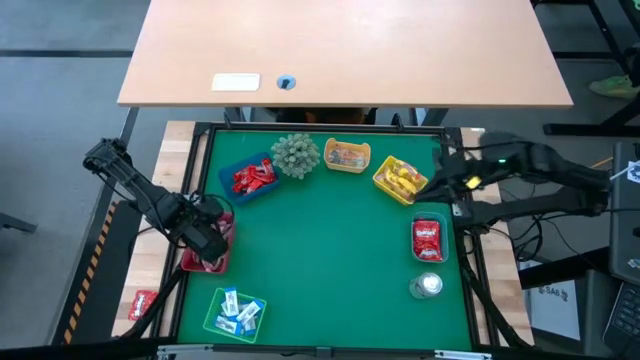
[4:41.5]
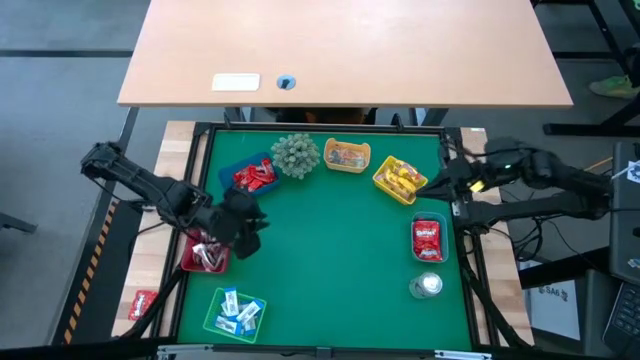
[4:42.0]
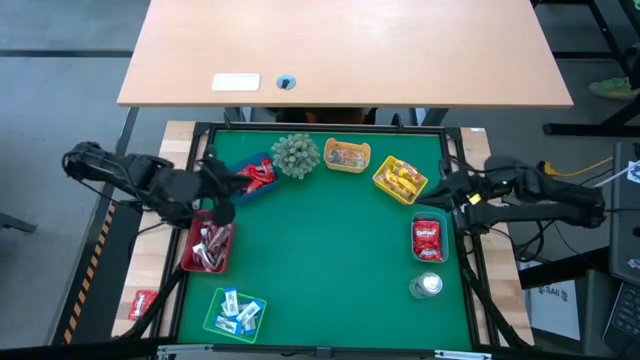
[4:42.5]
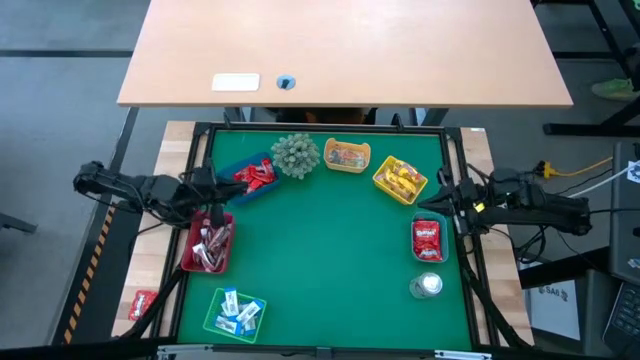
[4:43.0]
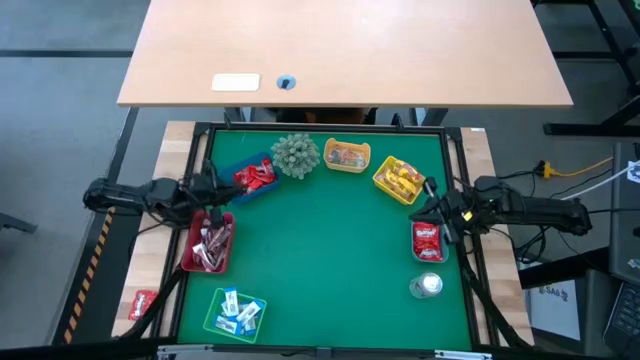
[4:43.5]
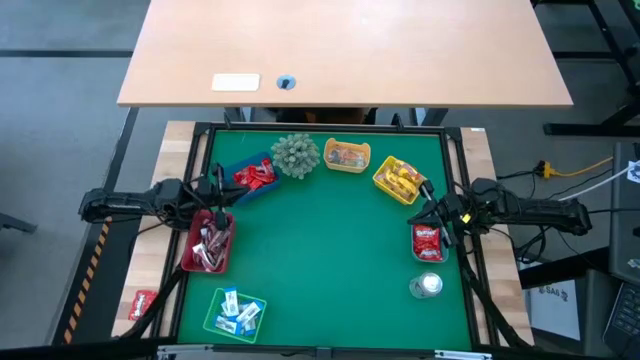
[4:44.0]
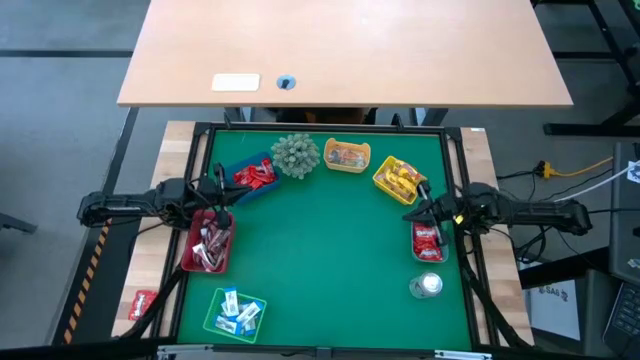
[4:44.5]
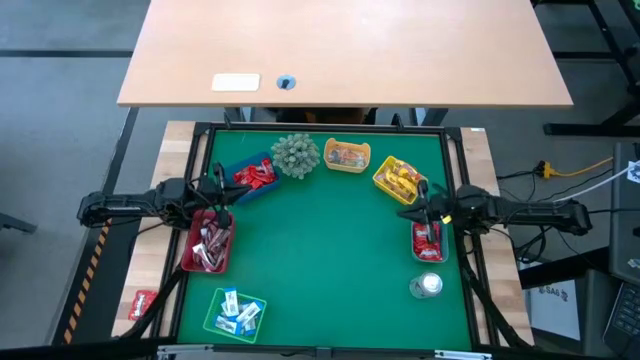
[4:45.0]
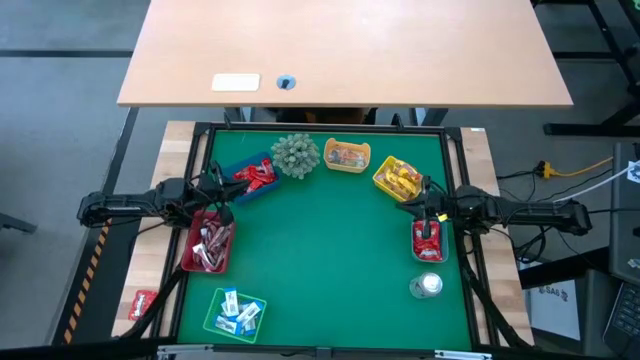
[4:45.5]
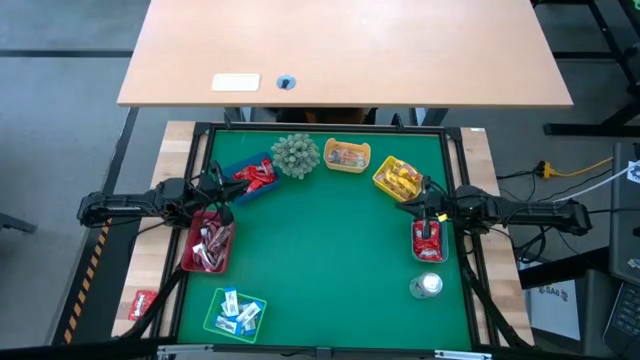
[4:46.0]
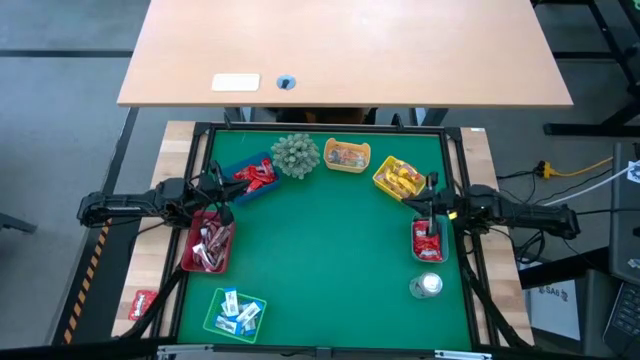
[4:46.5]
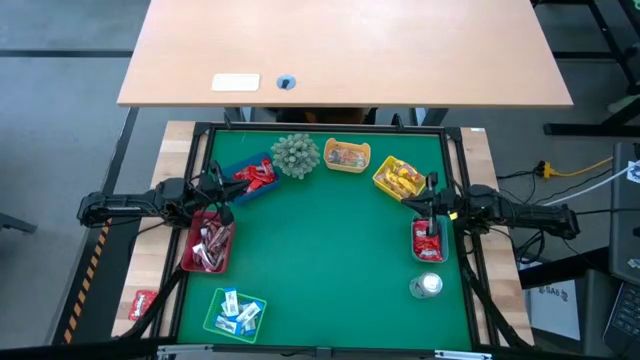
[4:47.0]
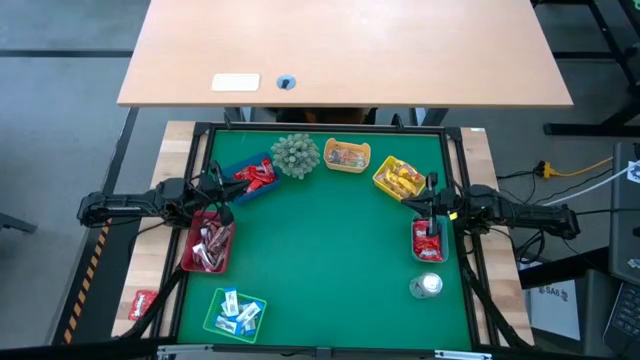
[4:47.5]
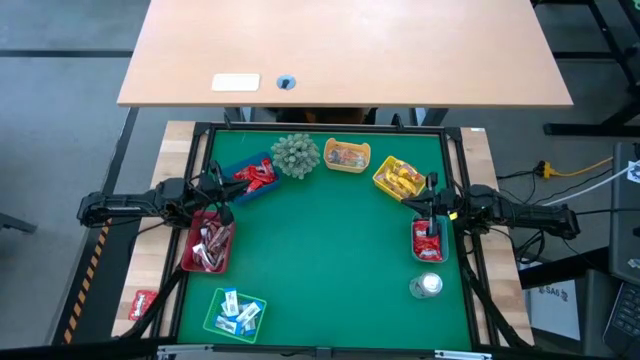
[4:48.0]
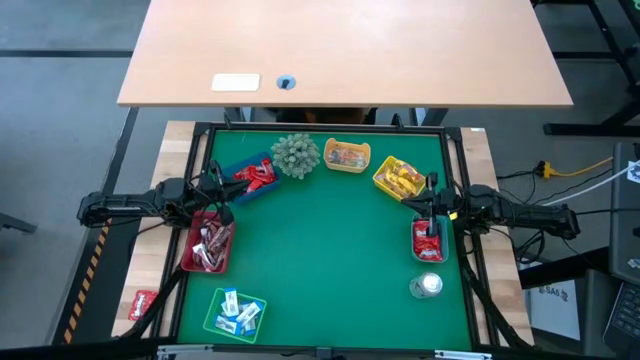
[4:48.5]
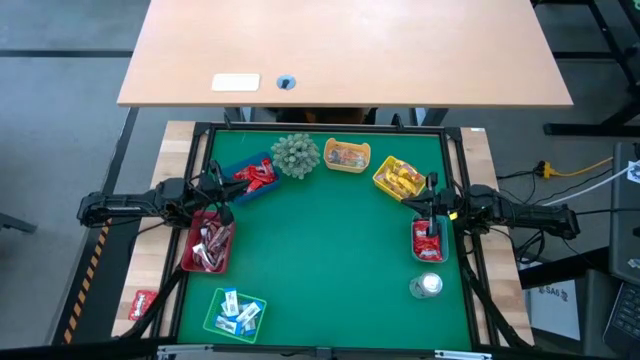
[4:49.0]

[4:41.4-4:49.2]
Task: Sort candy
Return to Home Position

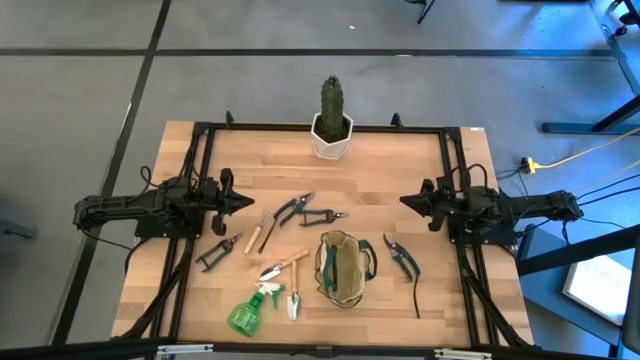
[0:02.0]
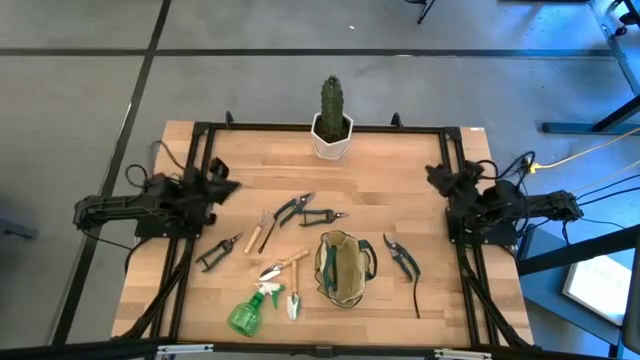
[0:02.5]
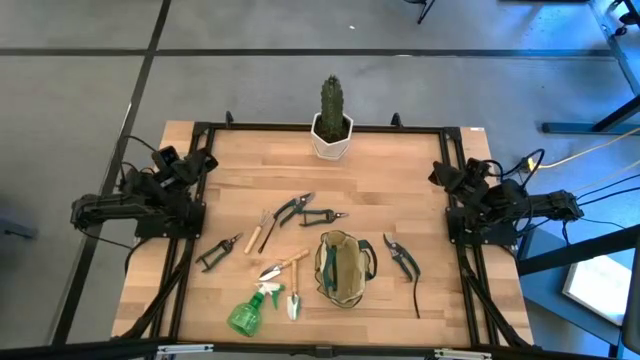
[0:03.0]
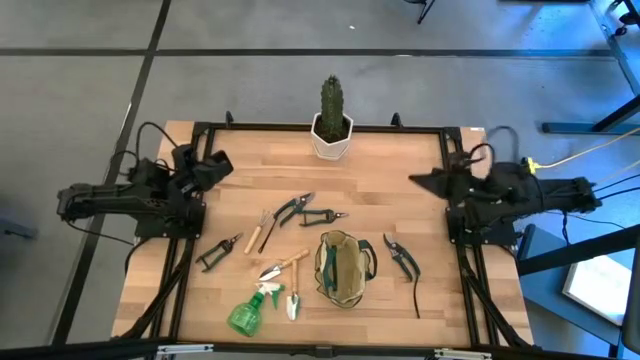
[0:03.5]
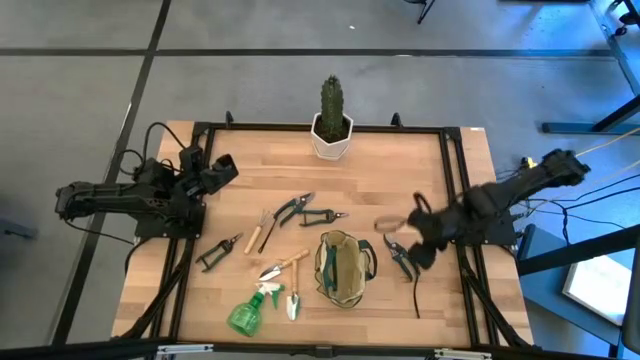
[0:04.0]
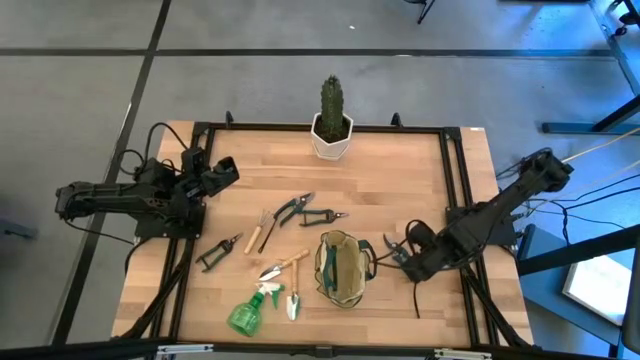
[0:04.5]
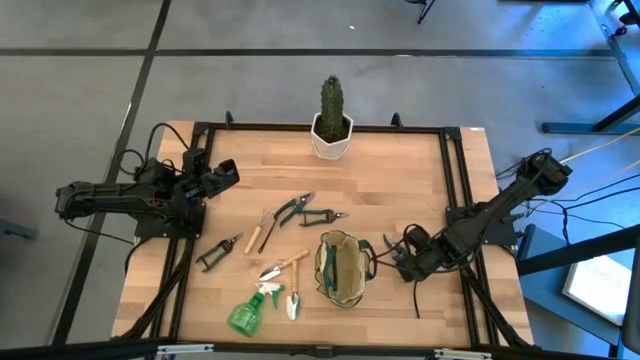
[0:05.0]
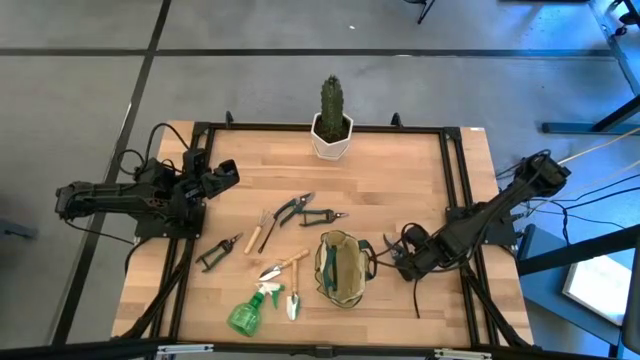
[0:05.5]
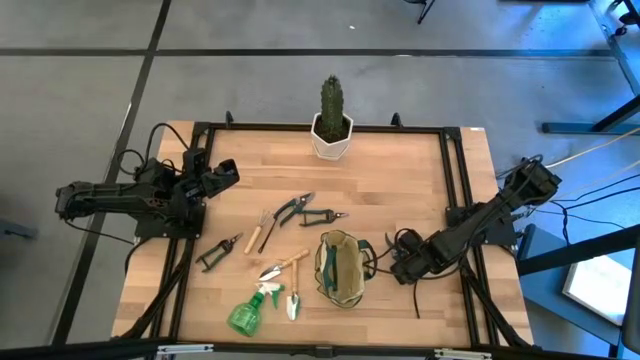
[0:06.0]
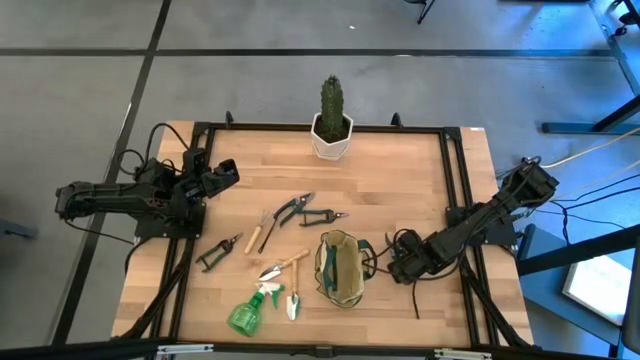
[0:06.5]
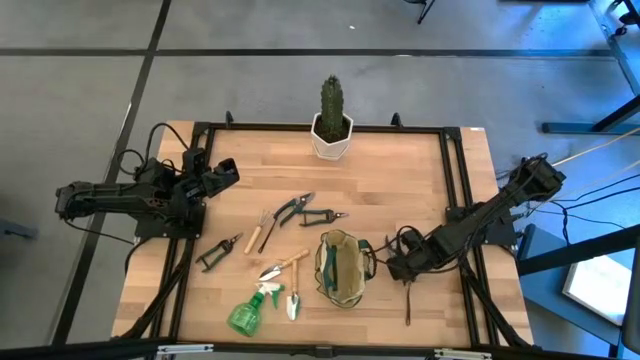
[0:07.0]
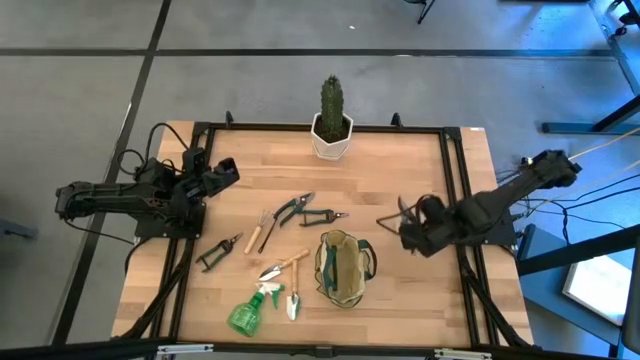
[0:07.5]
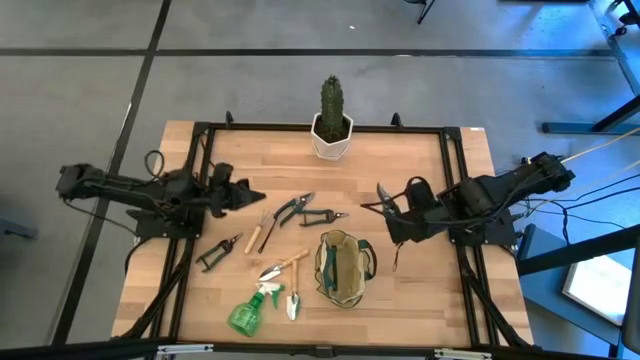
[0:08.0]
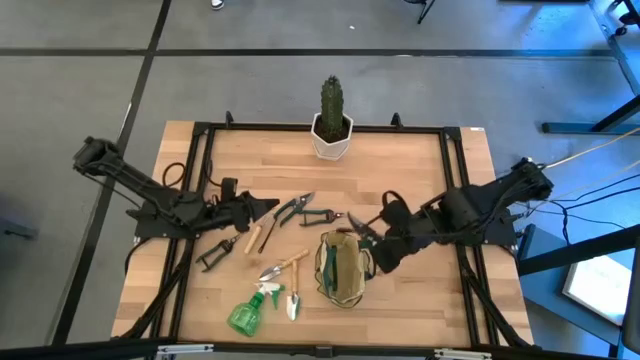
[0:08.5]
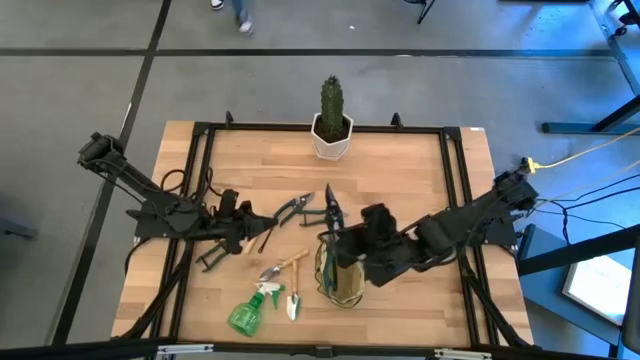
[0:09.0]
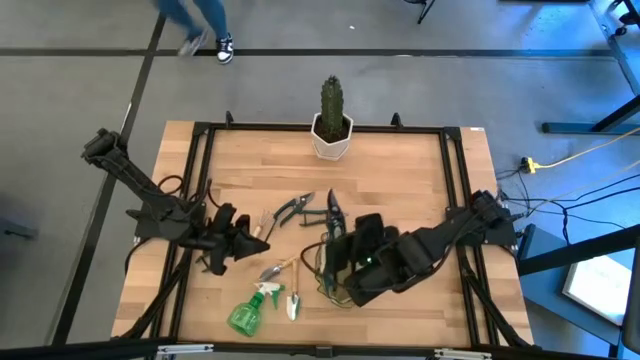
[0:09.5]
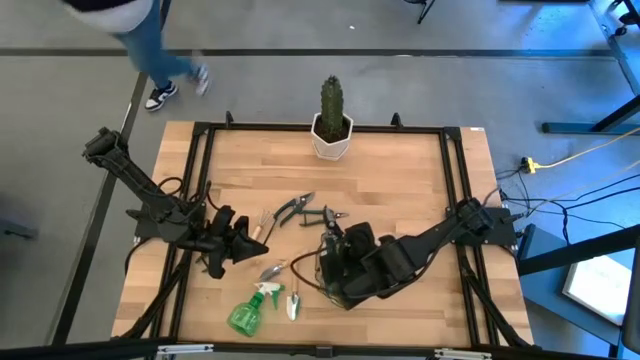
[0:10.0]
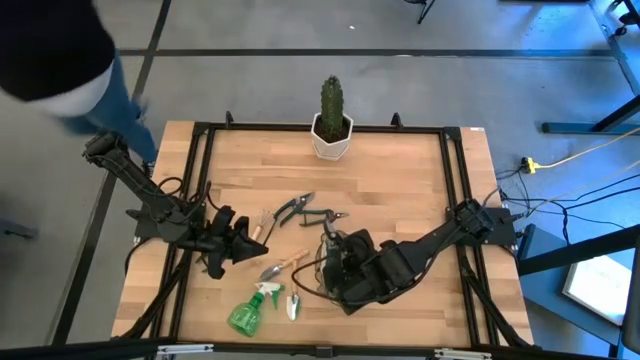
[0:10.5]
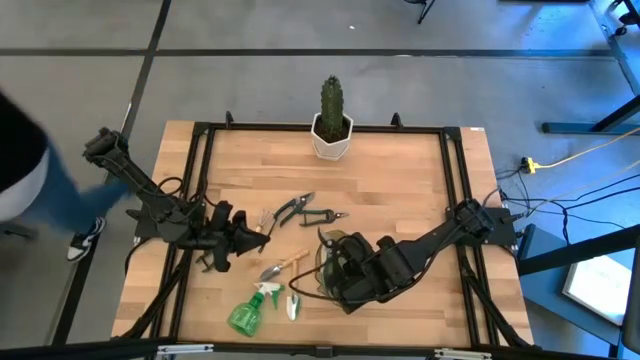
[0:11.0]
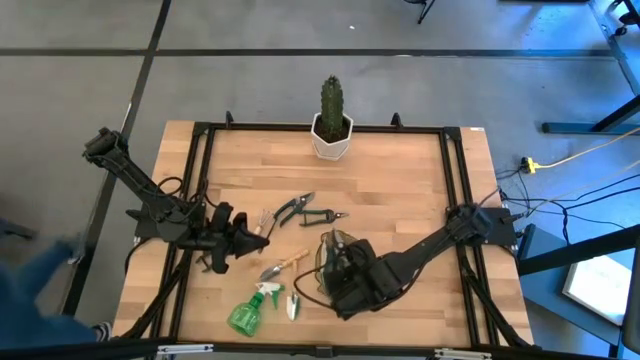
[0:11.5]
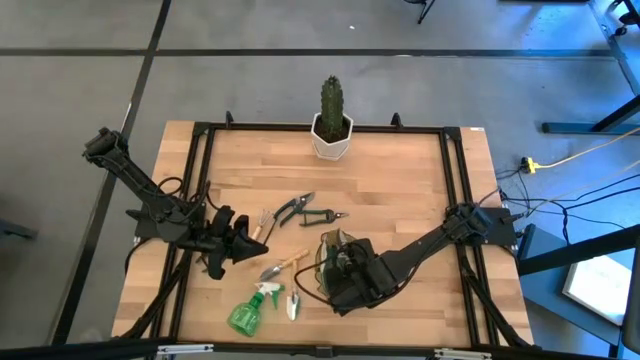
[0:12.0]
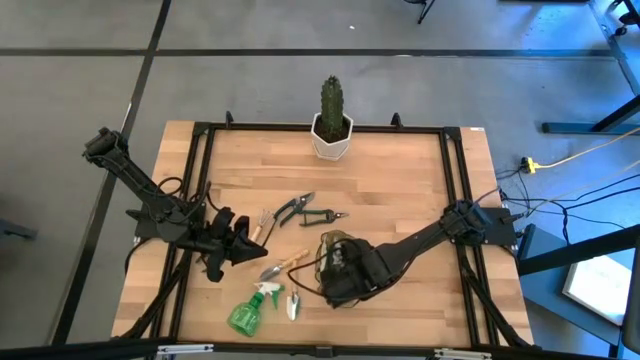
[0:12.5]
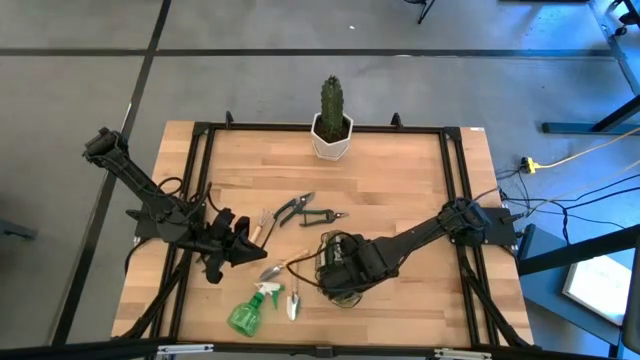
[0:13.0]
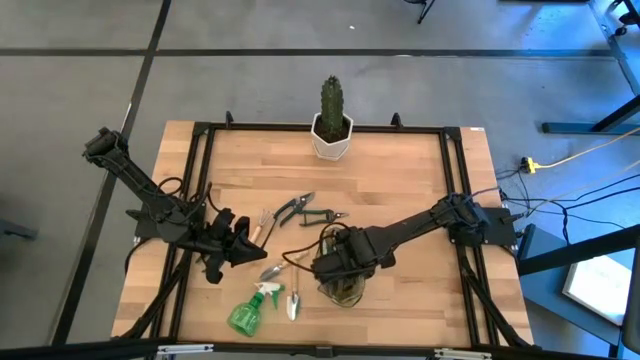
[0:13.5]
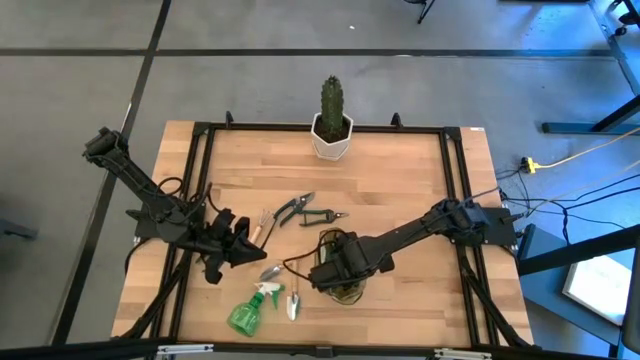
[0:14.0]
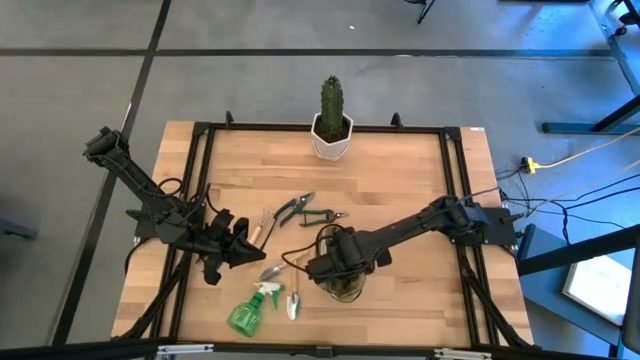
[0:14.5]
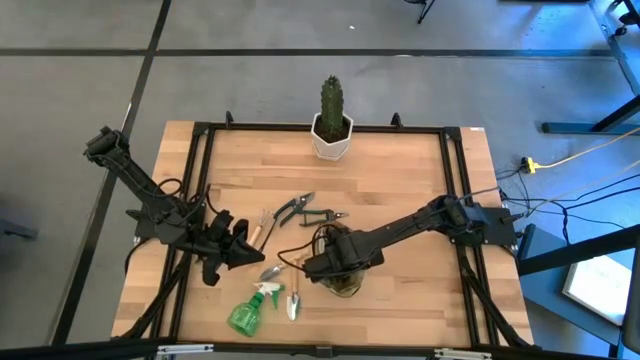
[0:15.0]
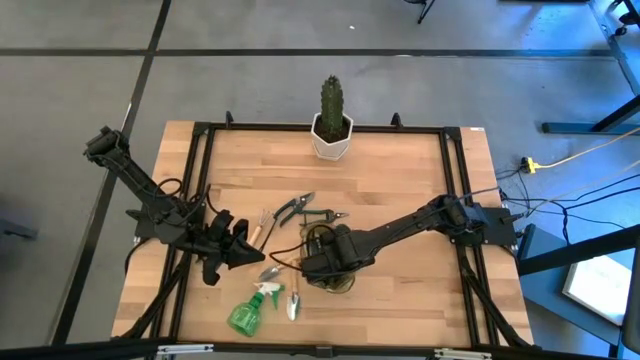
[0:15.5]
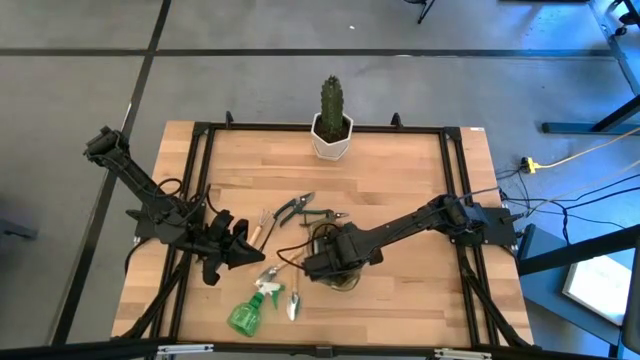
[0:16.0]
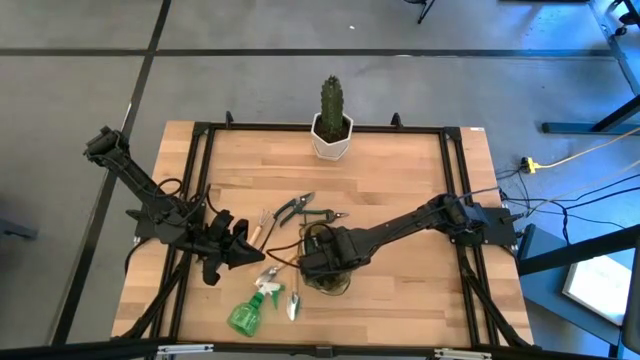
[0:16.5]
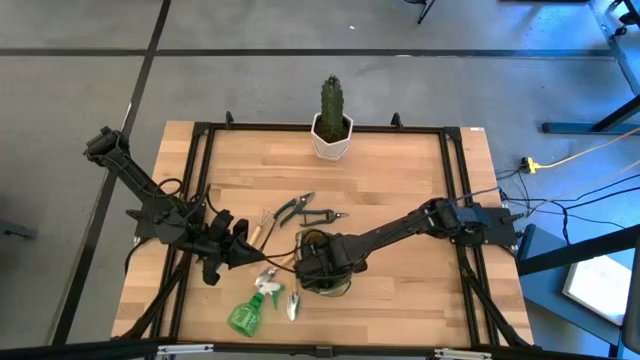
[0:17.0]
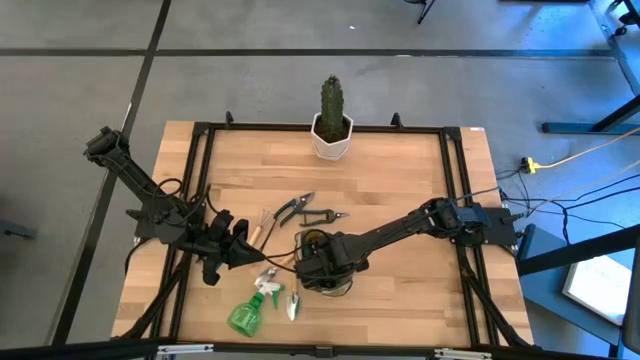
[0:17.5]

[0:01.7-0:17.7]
Task: Pick & Place Garden tools in Gardening bag
Put the bottom green shears into the green gardening bag
